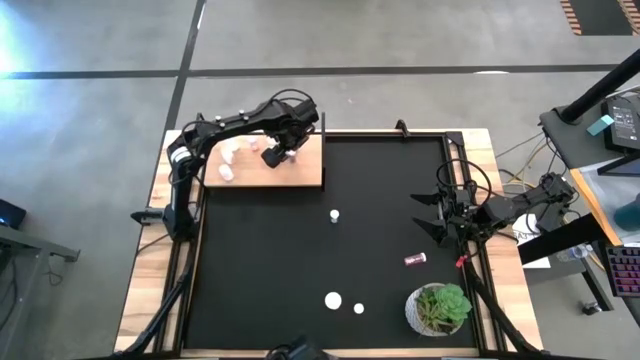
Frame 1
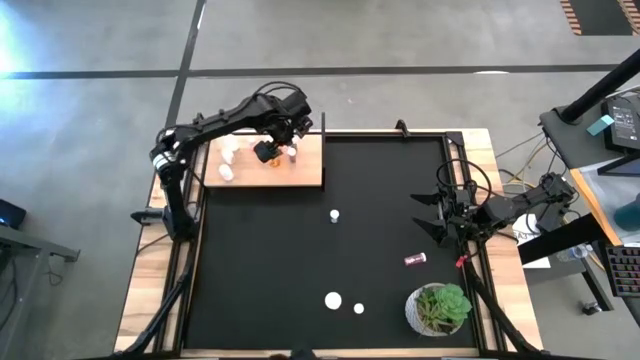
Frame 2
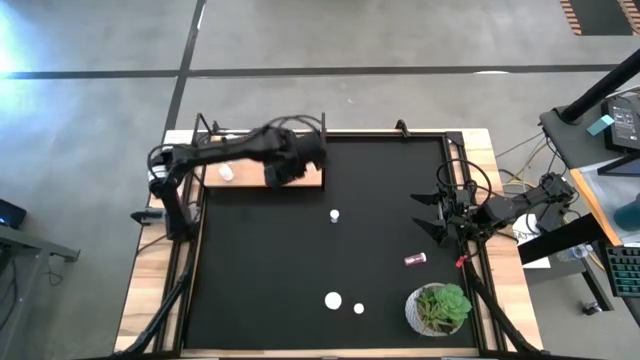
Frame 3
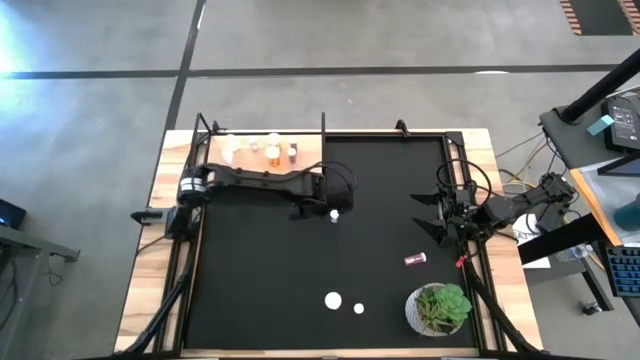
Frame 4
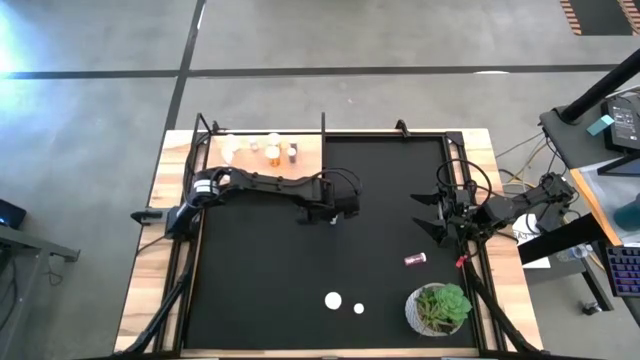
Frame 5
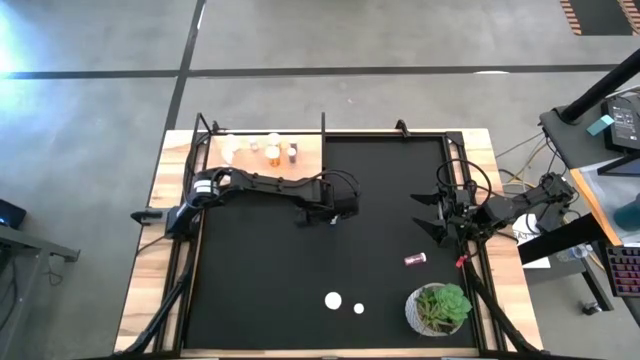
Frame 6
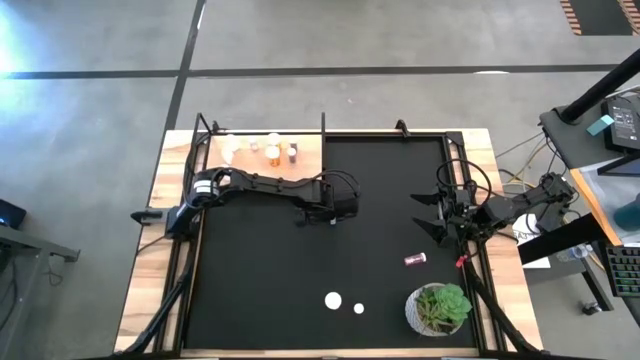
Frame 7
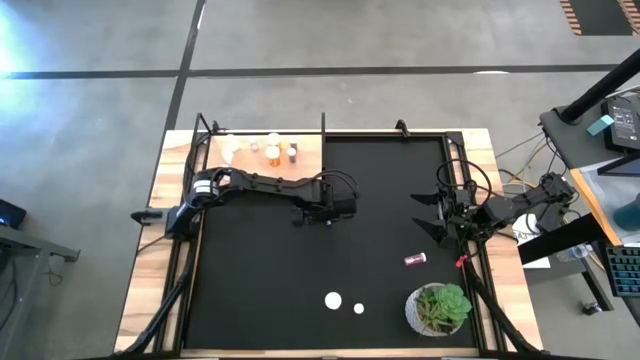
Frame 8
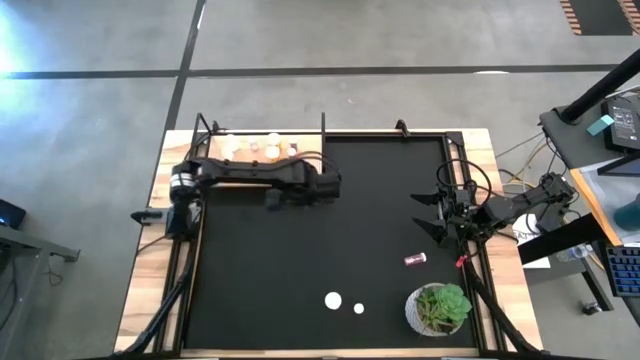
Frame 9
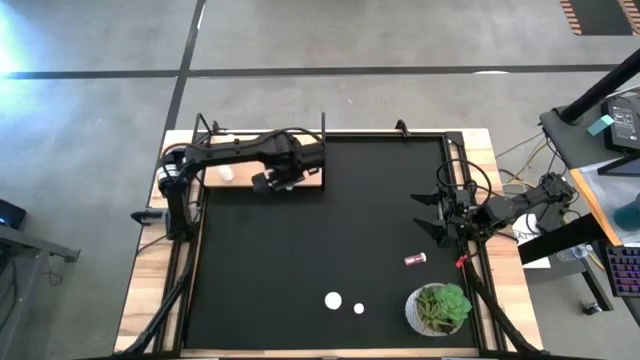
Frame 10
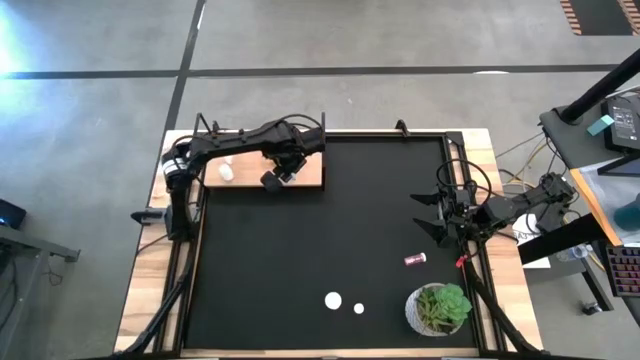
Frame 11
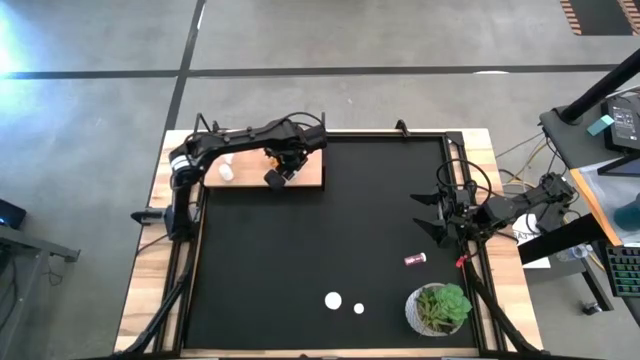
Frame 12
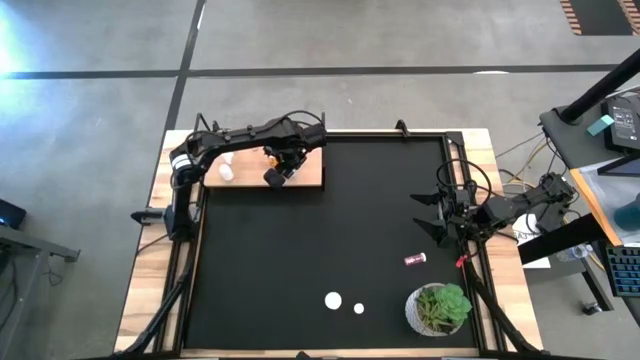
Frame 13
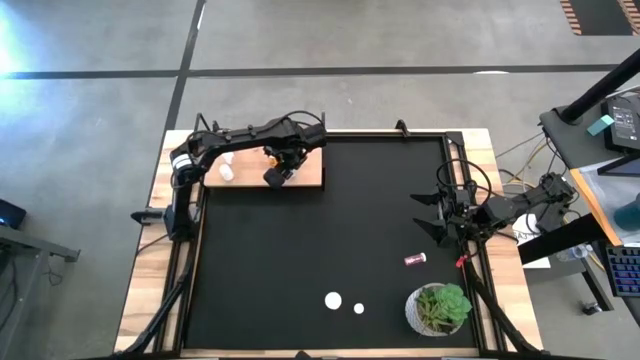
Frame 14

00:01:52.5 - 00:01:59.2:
Task: Pick and place medicine bottles onto shelf by color
Put the blue pill bottle on the shelf aligned with the other blue pill bottles

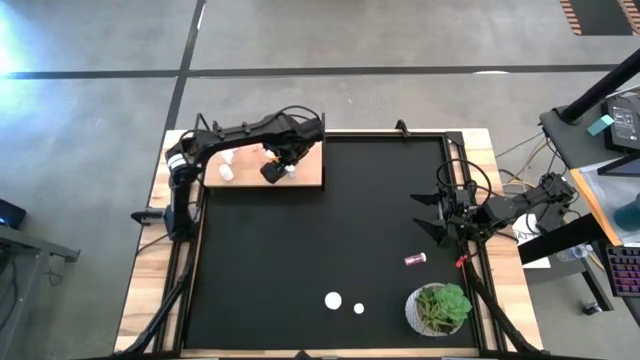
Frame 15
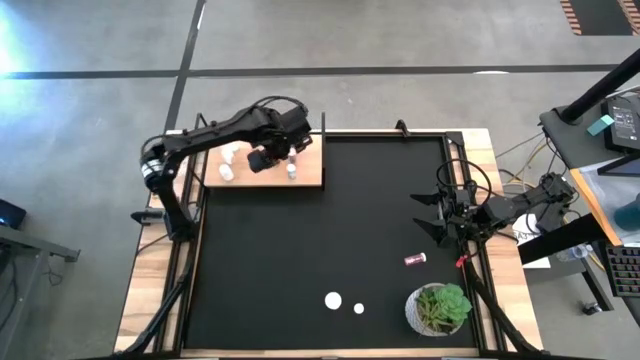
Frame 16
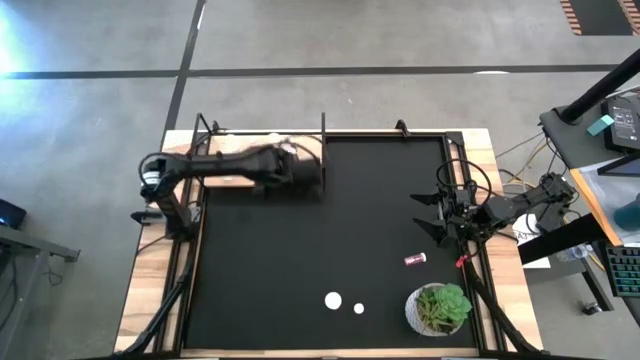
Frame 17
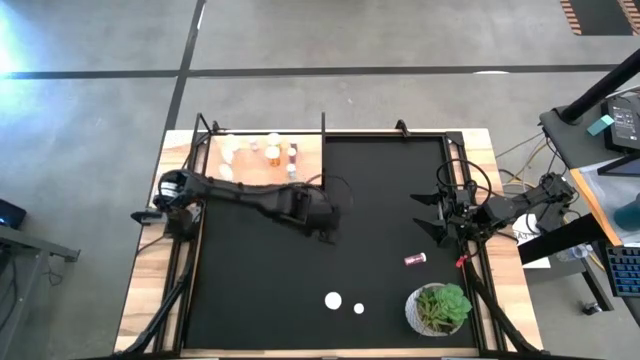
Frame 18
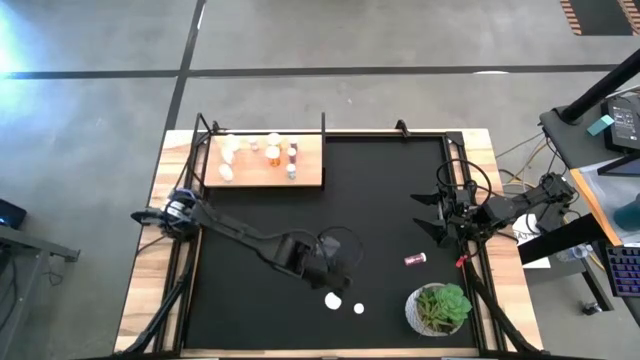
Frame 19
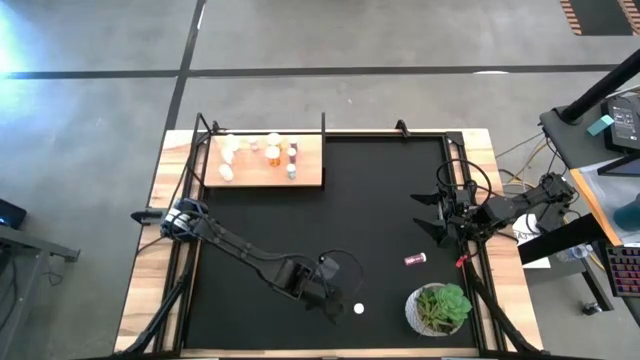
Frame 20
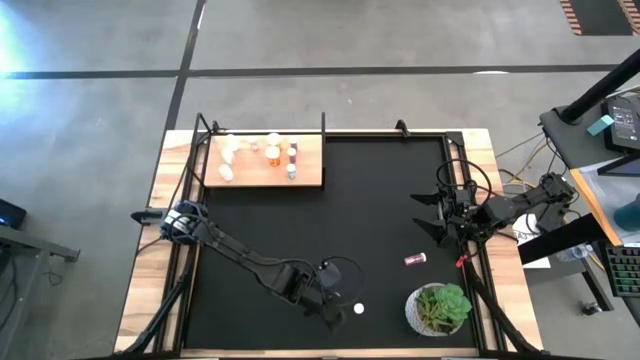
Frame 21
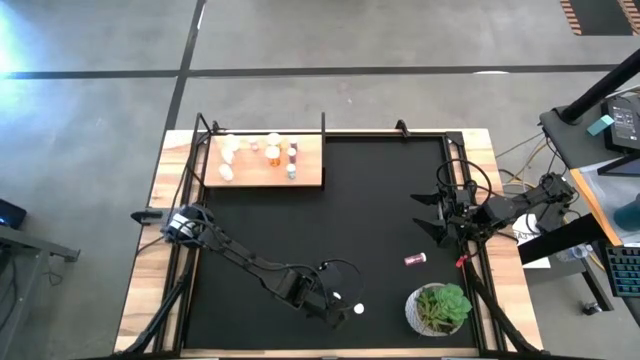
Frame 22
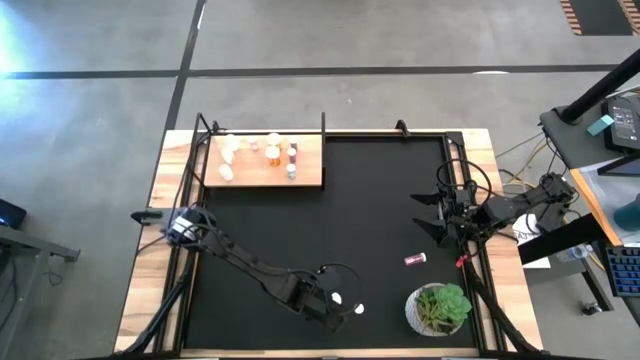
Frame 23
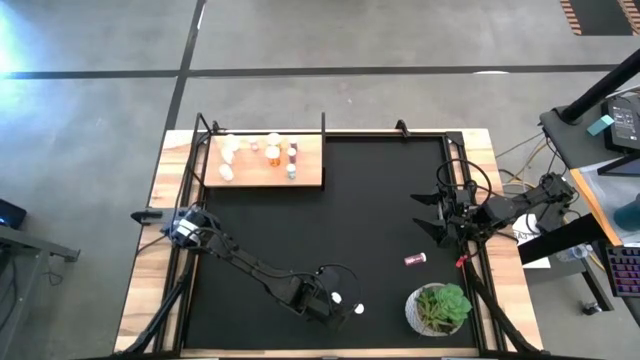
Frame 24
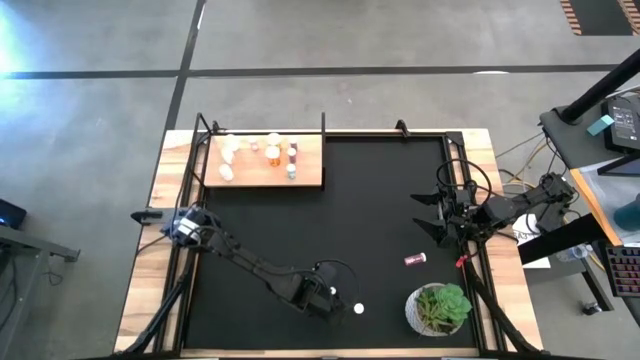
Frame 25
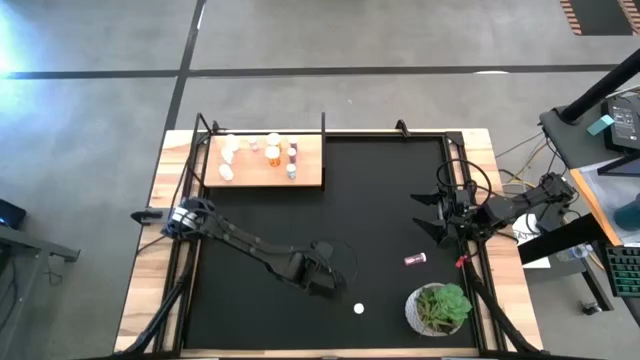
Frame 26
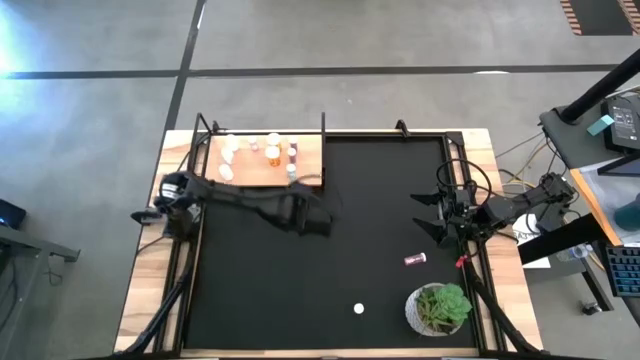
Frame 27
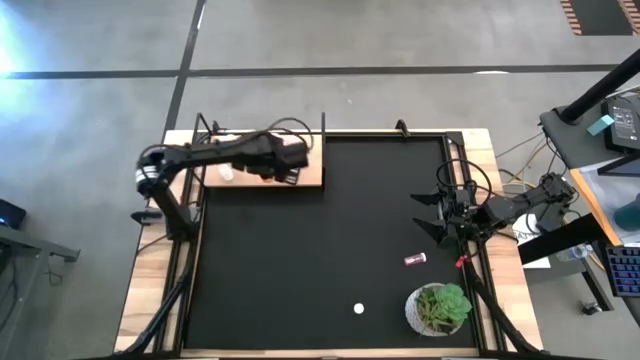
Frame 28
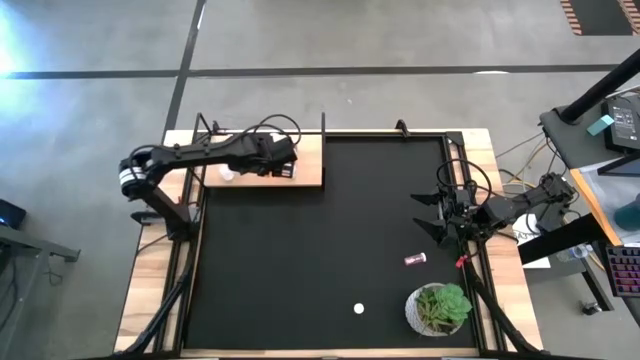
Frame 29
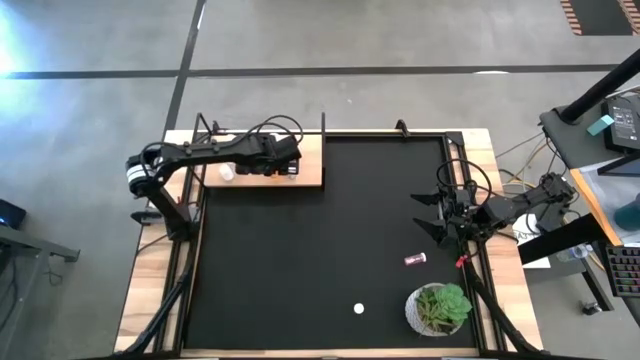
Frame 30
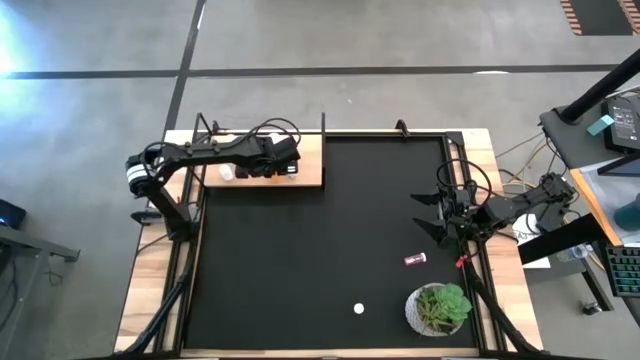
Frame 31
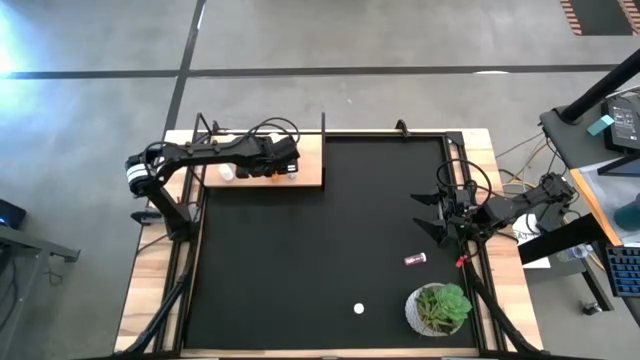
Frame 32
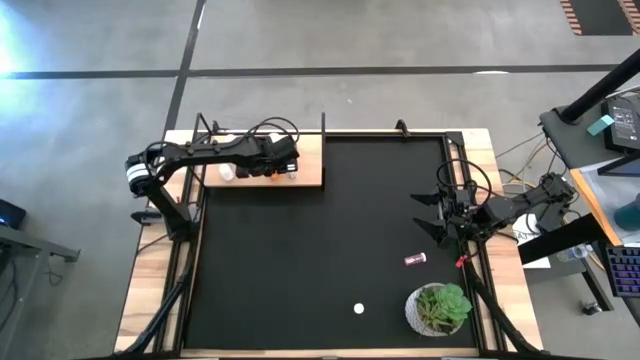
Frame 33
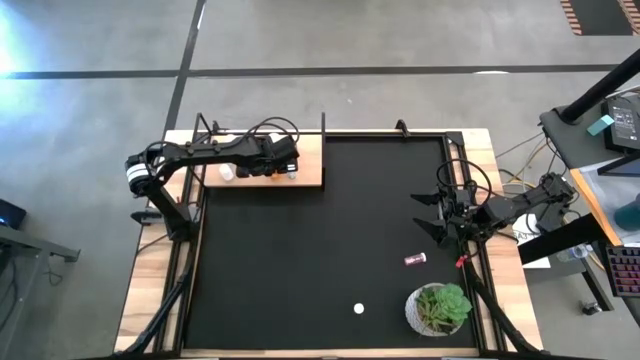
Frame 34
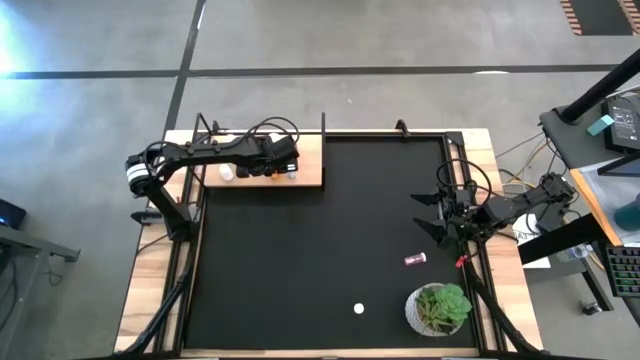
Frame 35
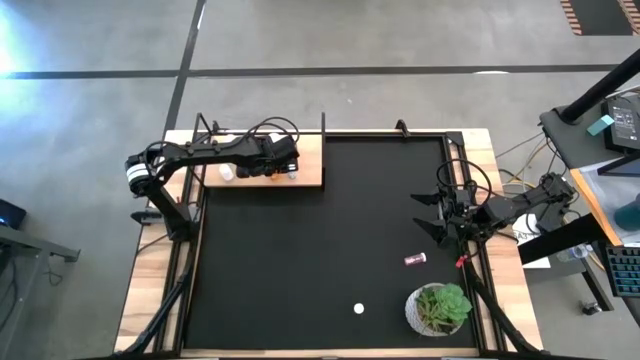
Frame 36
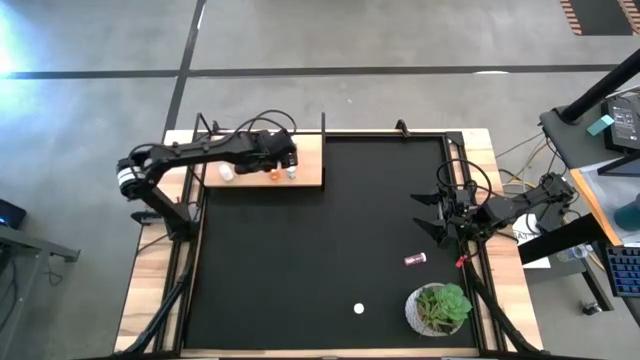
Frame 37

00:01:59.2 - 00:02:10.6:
Put the orange pill bottle on the shelf aligned with the orange pill bottles

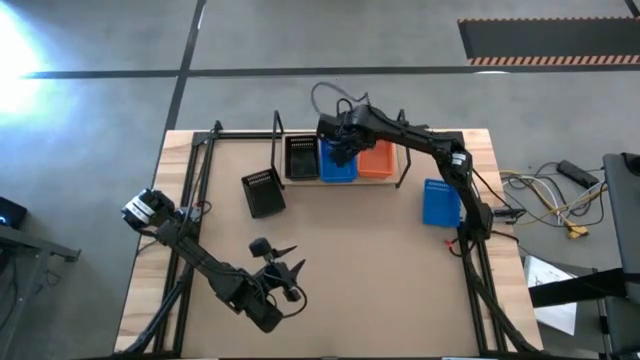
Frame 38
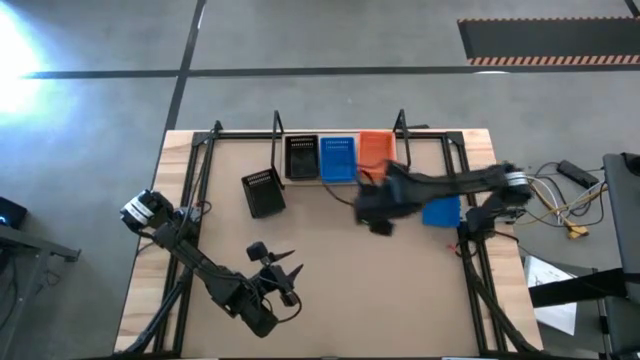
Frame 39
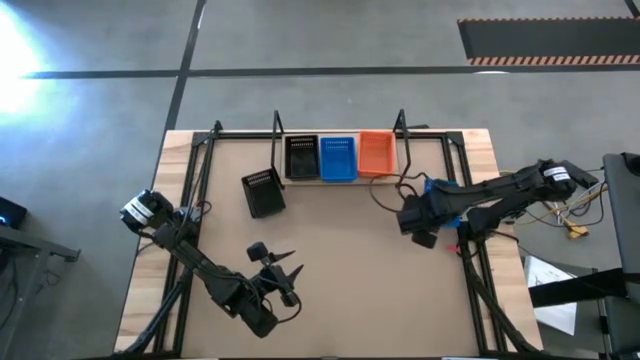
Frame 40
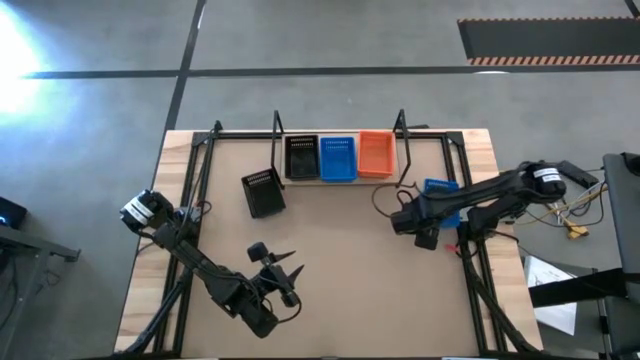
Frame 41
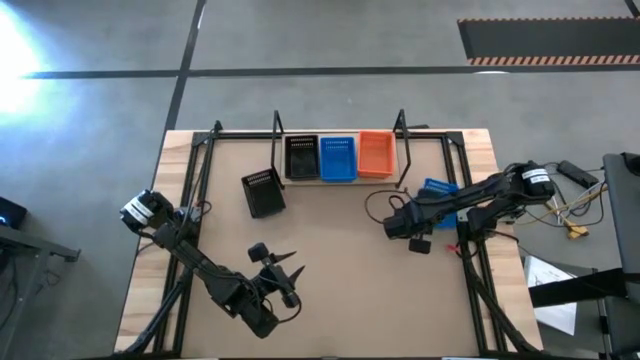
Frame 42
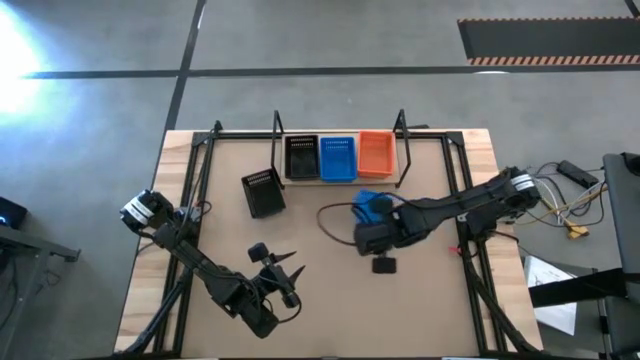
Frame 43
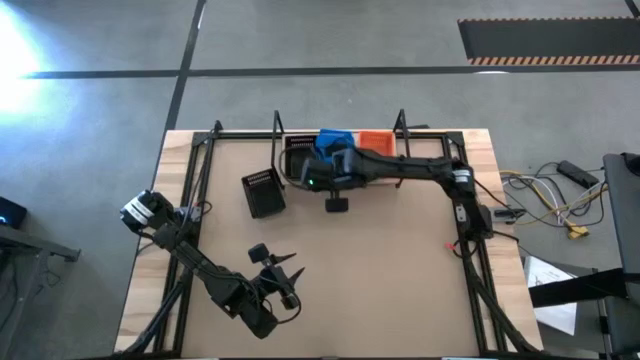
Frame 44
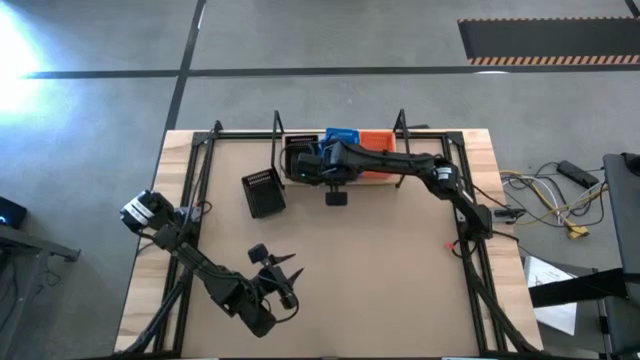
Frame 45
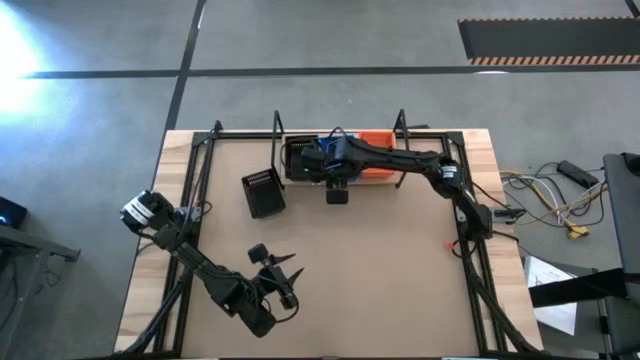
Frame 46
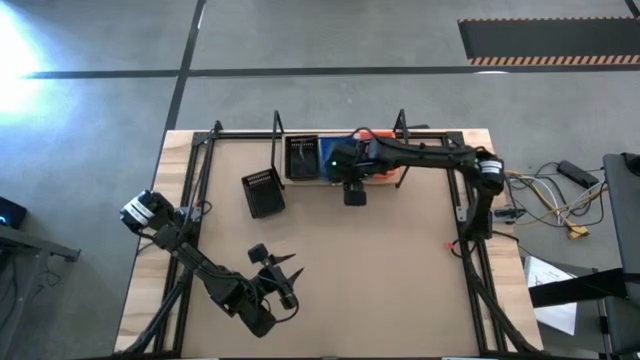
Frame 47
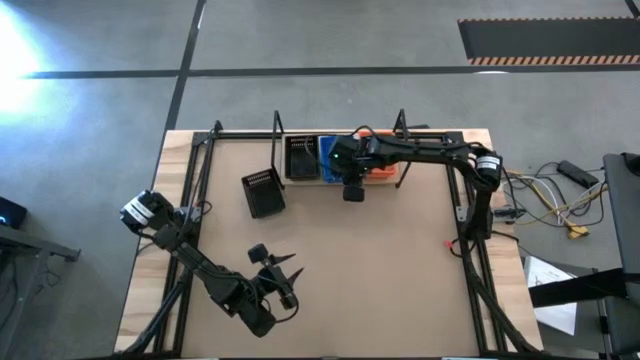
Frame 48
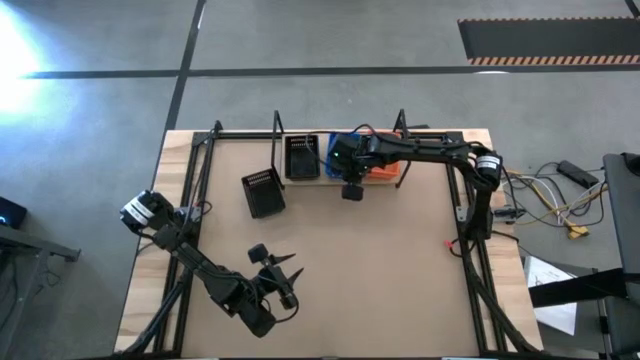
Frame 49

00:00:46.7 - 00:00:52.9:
Task: Stack baskets on shelf by color
Stack the blue bin on the blue bin on the shelf
